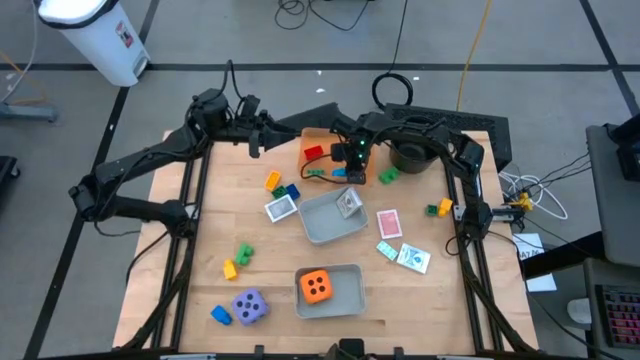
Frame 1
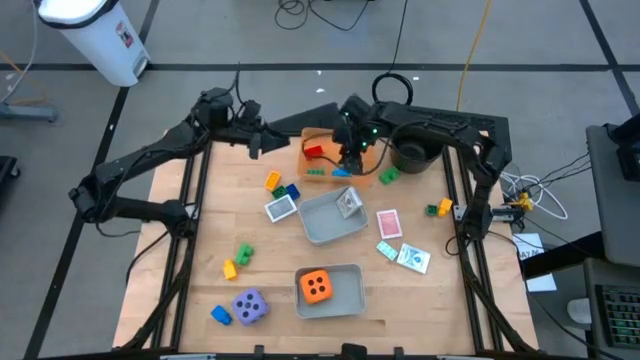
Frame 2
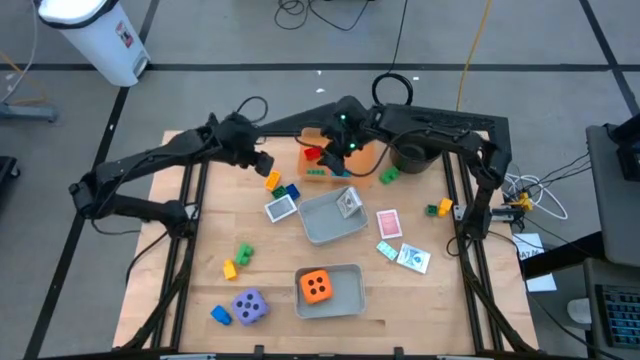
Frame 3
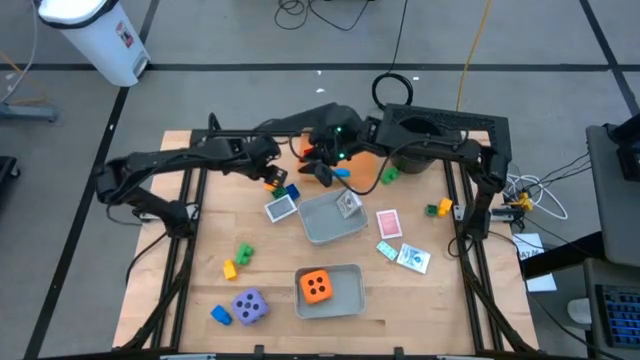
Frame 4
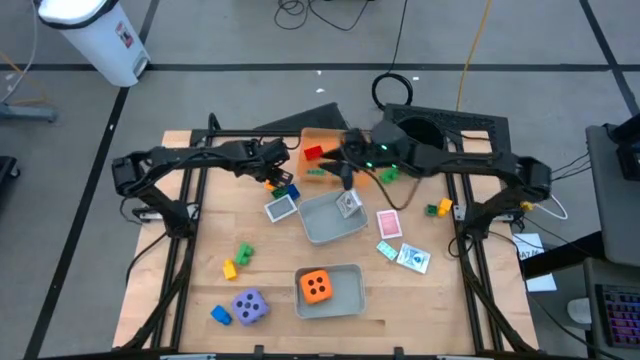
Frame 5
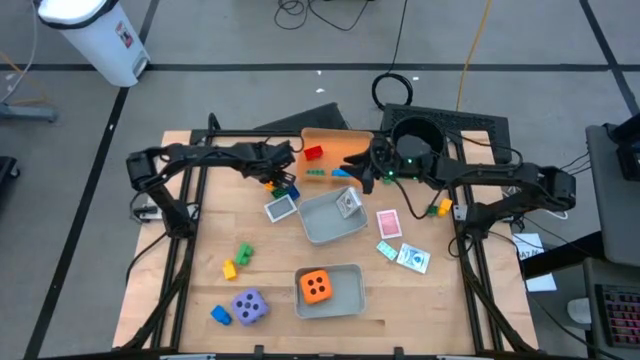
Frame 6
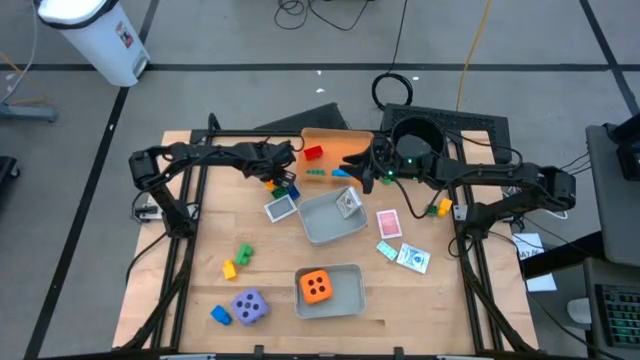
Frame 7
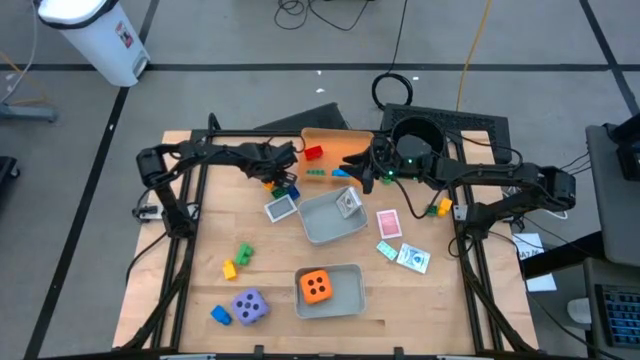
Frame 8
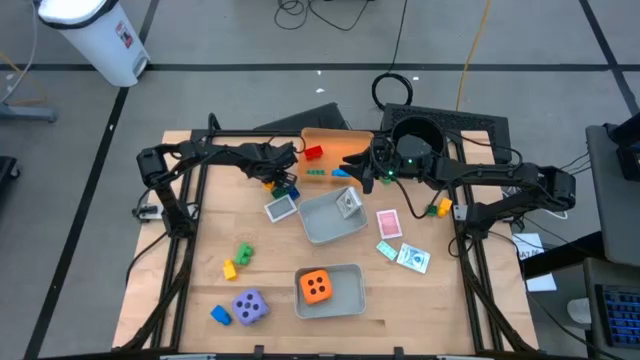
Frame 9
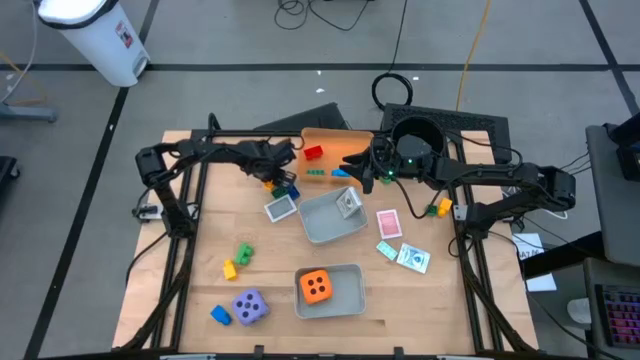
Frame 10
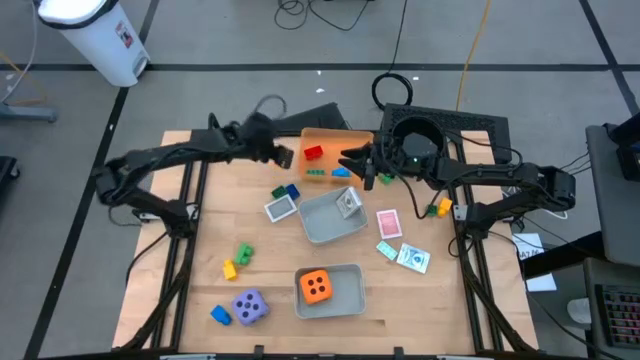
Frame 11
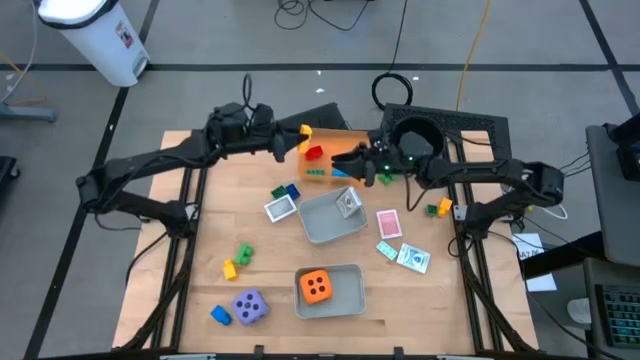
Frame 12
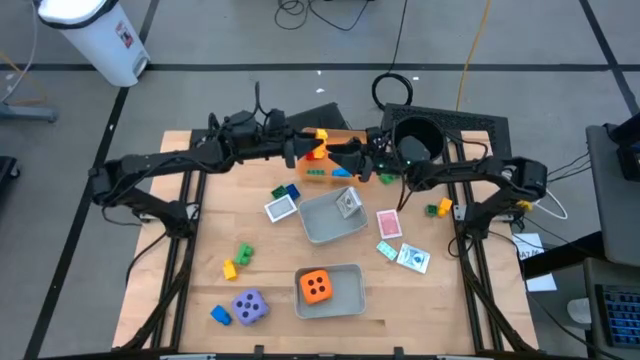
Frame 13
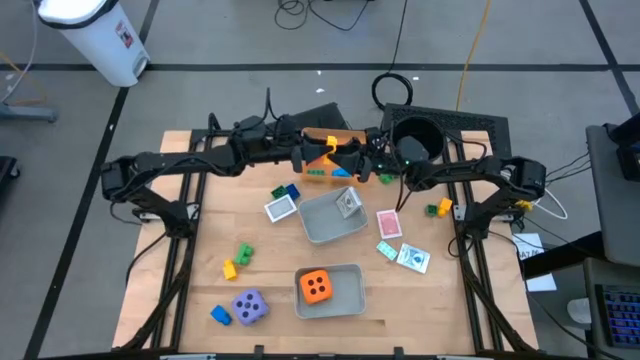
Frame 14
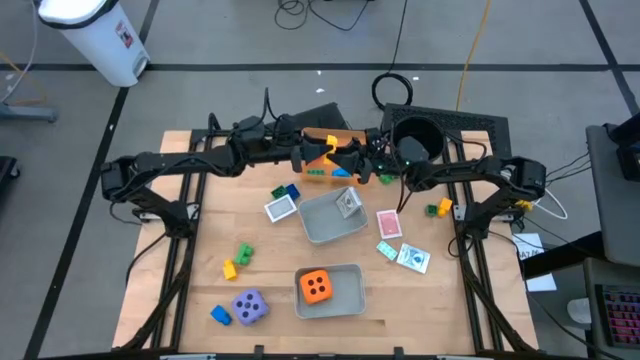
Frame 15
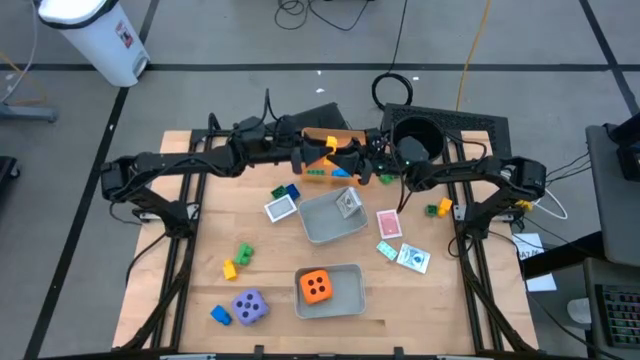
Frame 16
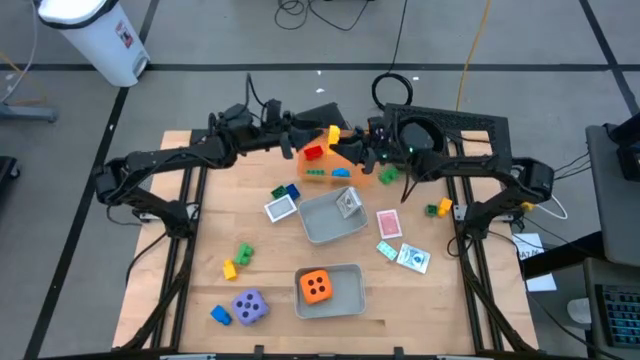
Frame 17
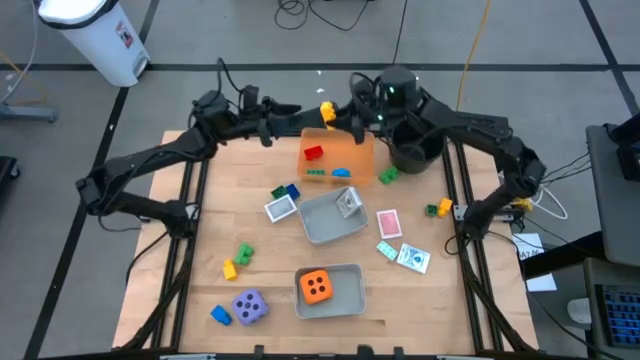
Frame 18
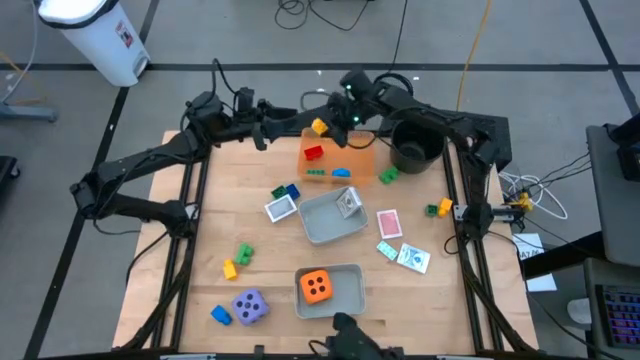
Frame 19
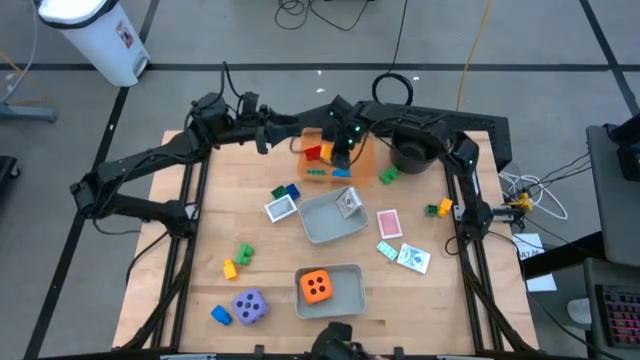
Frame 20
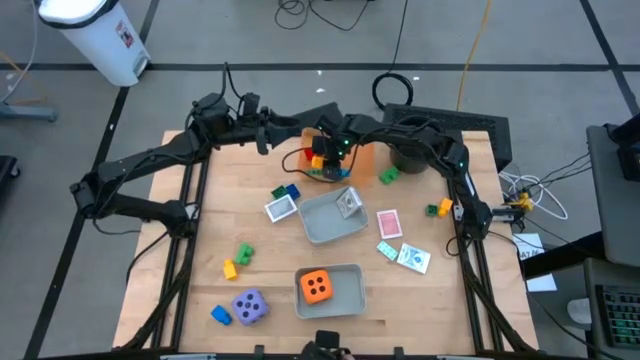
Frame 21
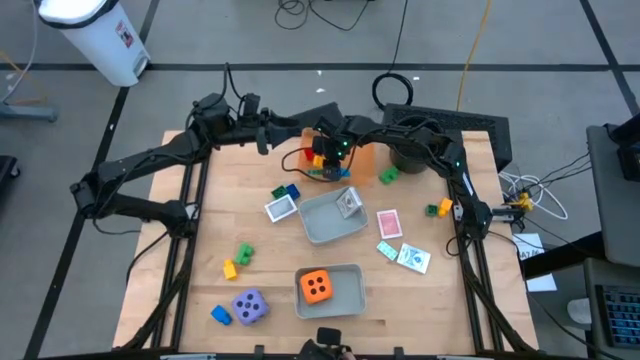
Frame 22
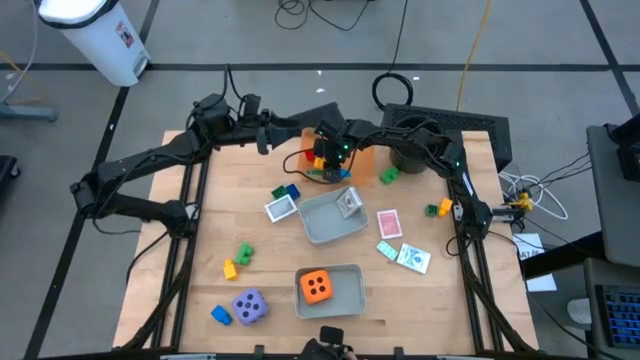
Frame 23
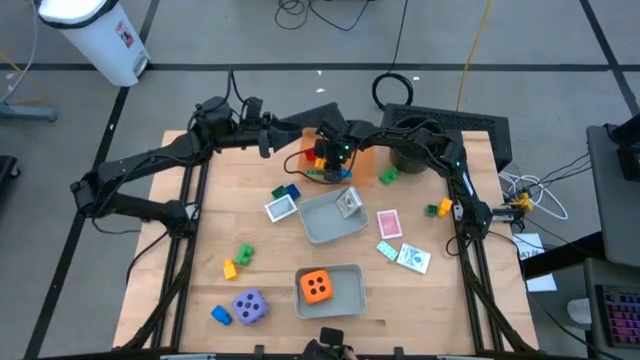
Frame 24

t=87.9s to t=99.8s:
Task: Pick & Place Toys
Put the yellow game piece into the orange bin

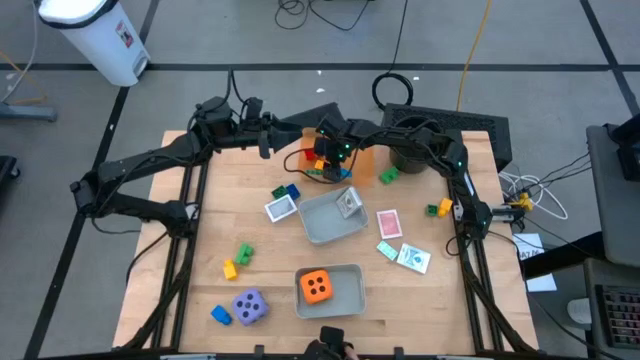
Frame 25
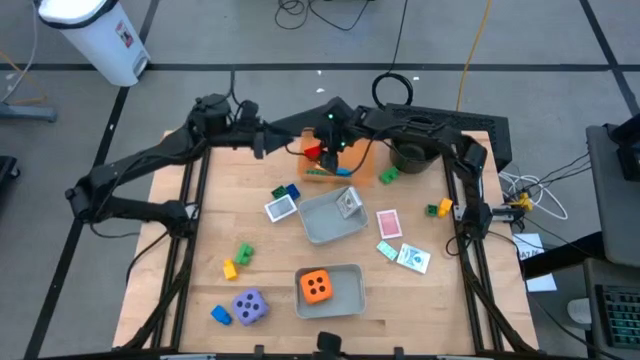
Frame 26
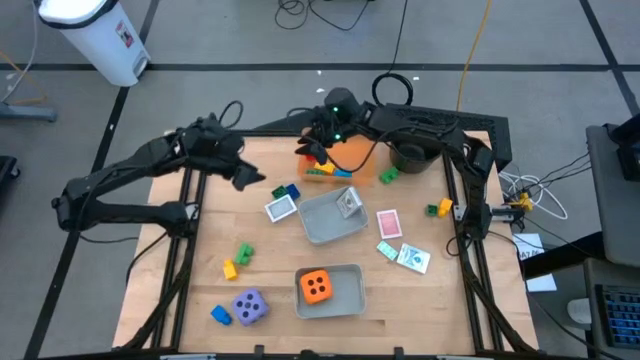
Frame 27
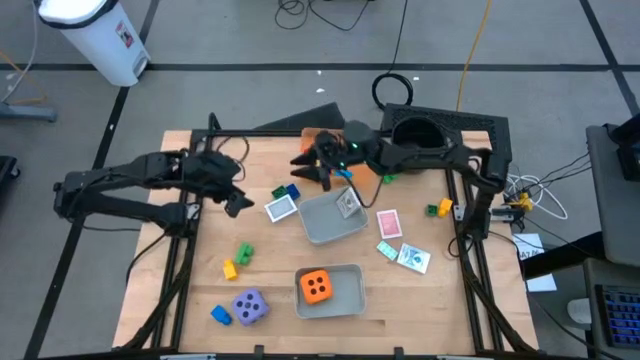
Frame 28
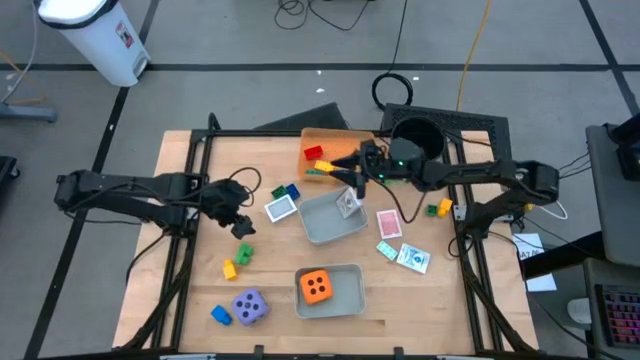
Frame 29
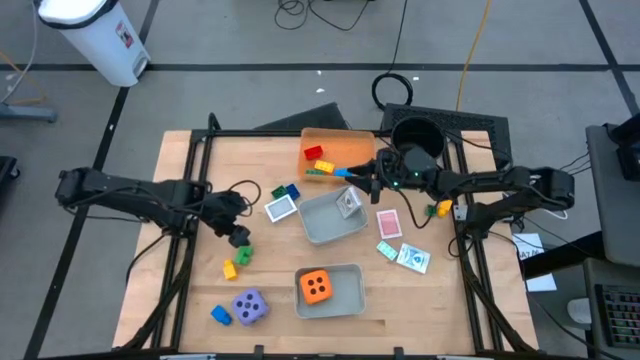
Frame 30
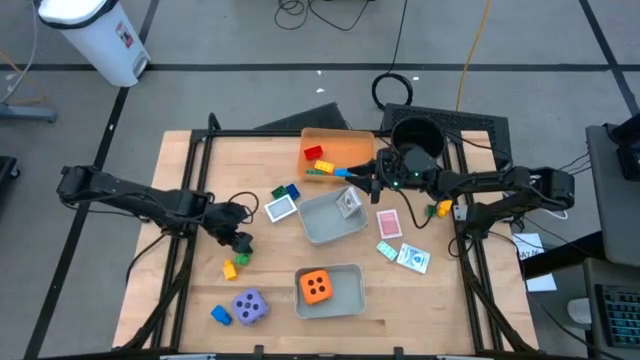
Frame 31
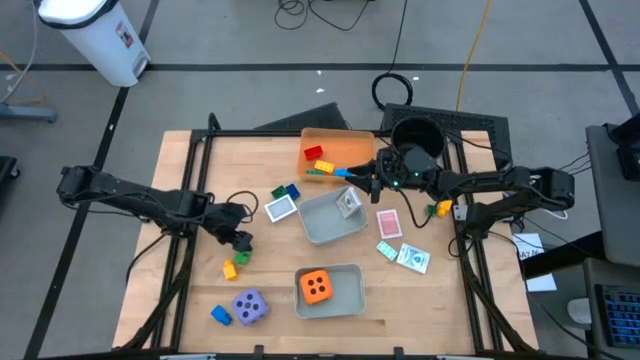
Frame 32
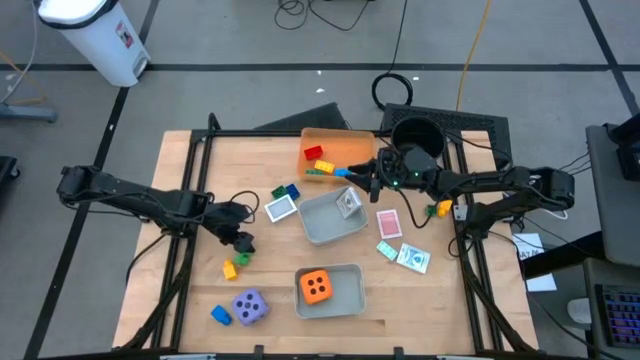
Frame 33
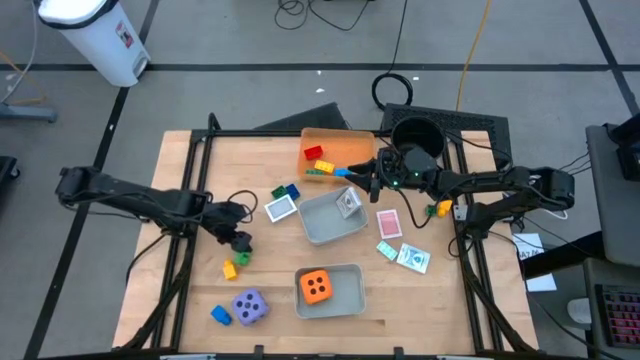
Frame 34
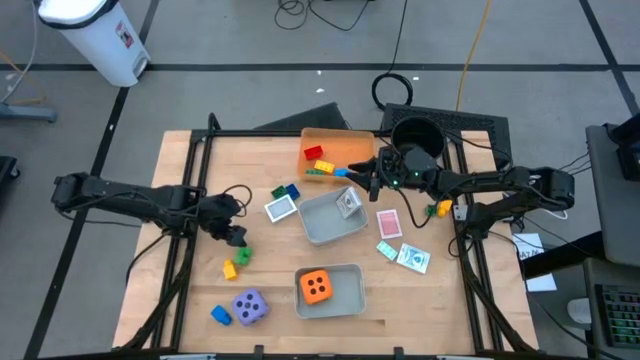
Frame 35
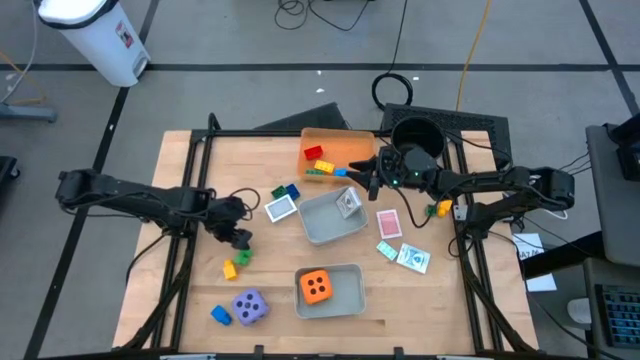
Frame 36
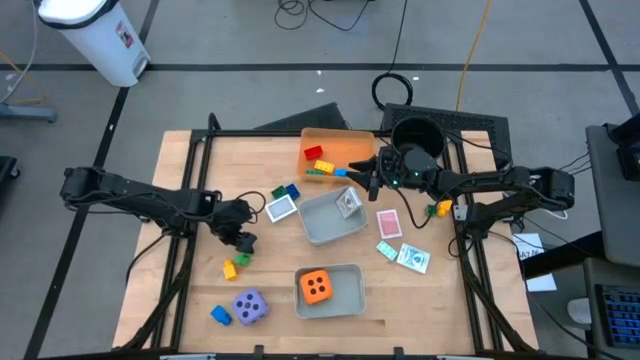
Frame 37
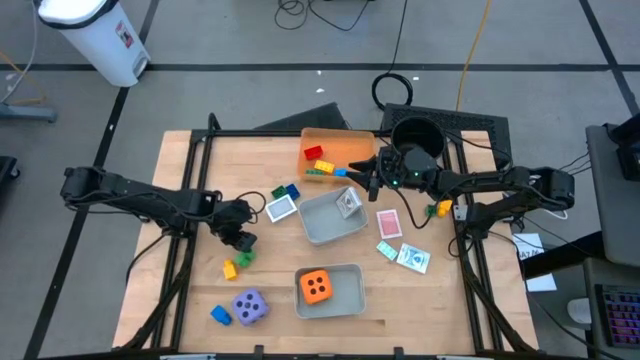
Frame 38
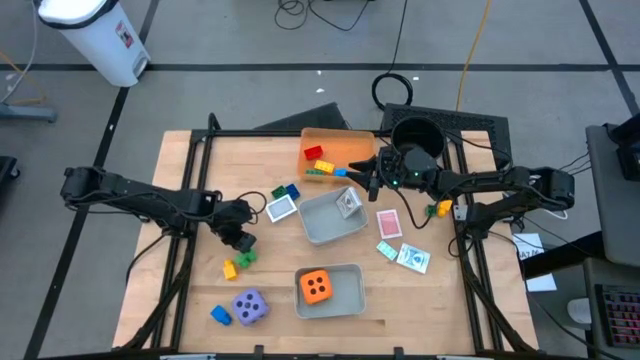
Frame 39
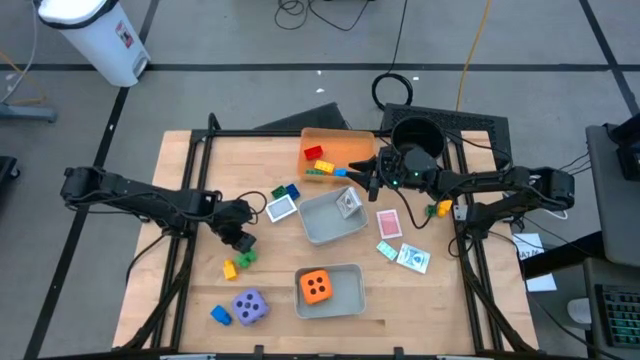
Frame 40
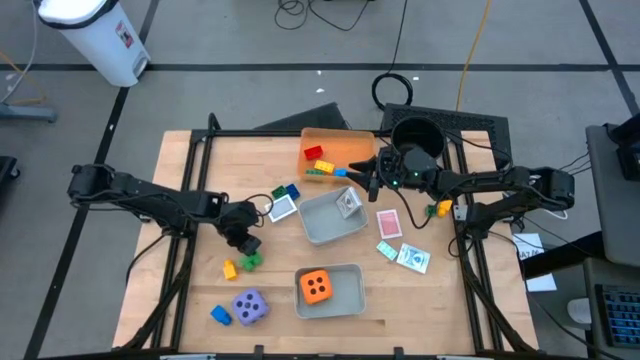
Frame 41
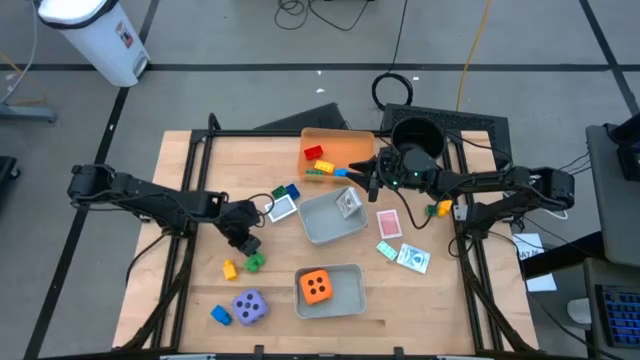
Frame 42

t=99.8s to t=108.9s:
Put the green game piece into the orange bin

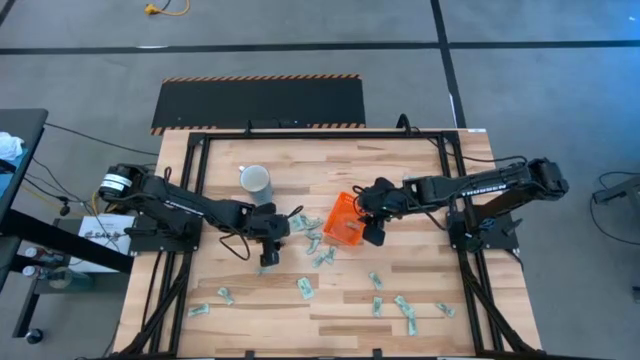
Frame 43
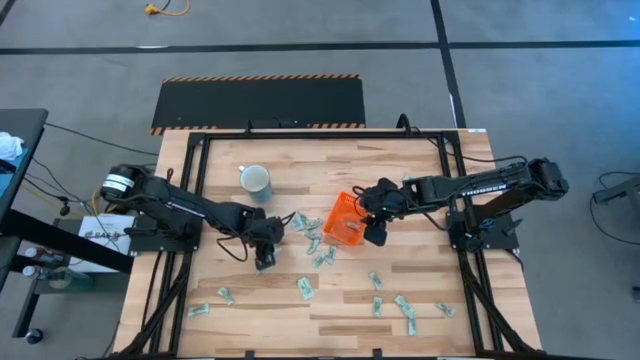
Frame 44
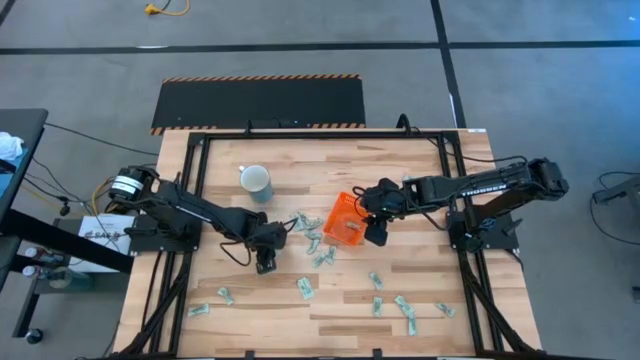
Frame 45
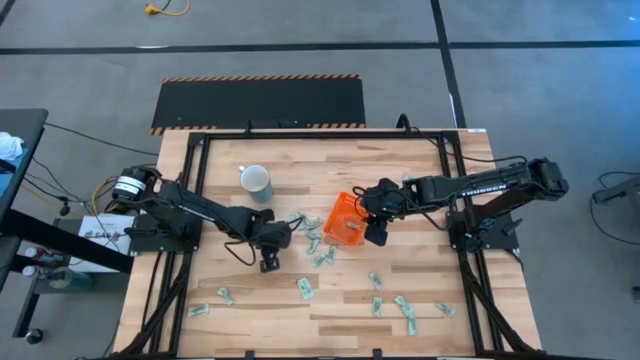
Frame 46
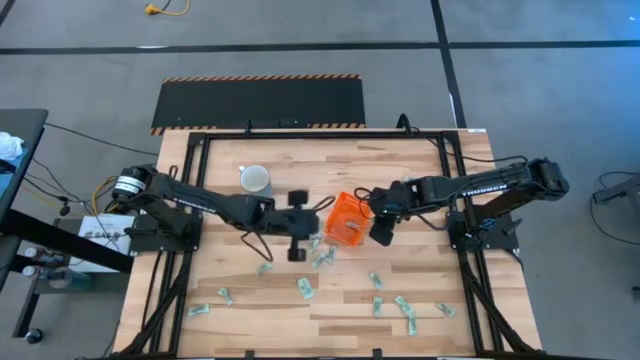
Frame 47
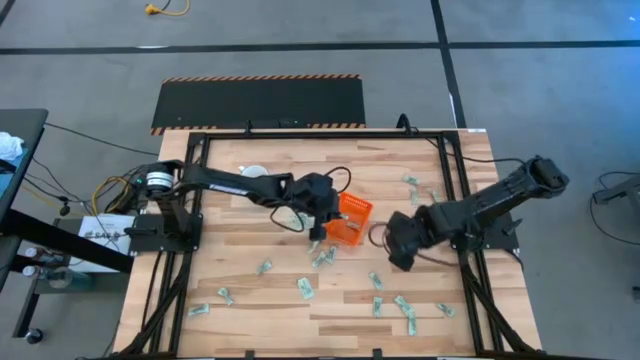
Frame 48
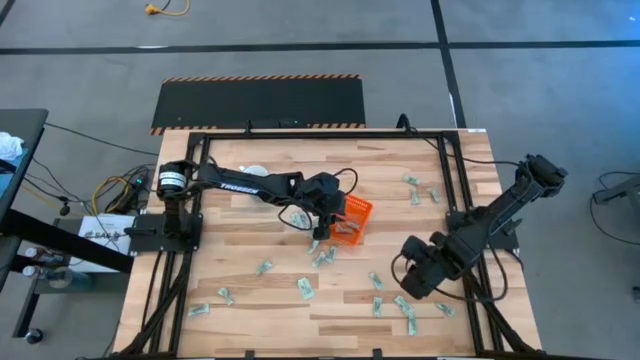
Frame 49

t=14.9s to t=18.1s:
Task: Pick and place Stevia / Truvia into bins
Put the stevia packet into the basket
